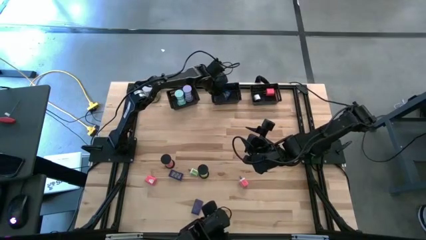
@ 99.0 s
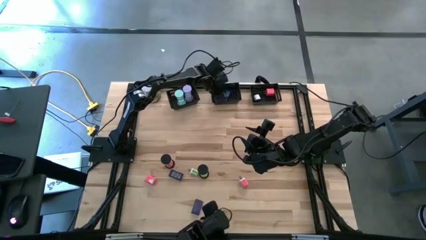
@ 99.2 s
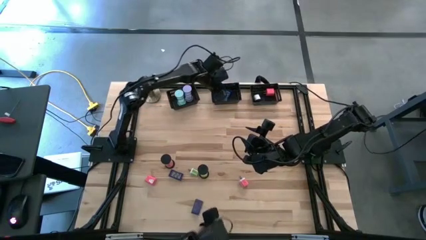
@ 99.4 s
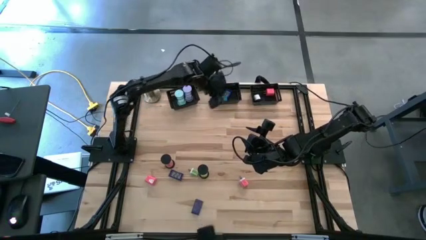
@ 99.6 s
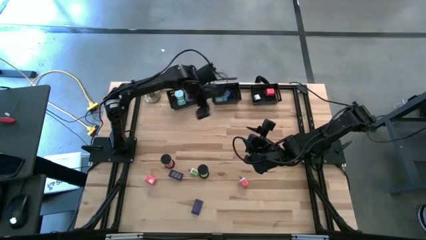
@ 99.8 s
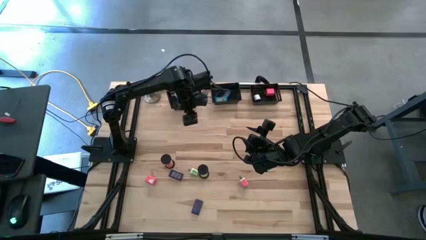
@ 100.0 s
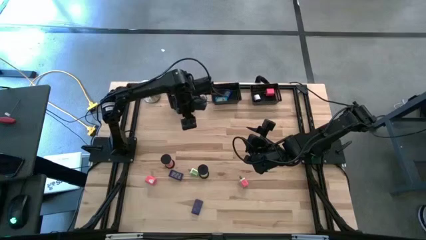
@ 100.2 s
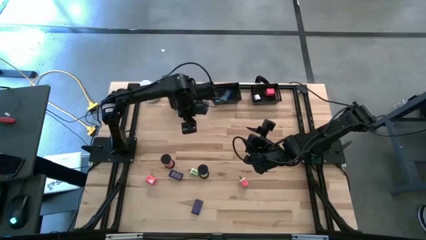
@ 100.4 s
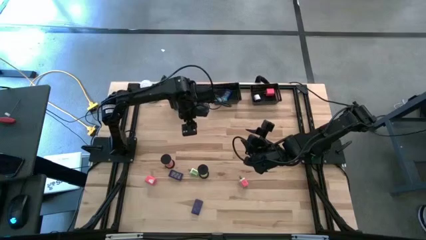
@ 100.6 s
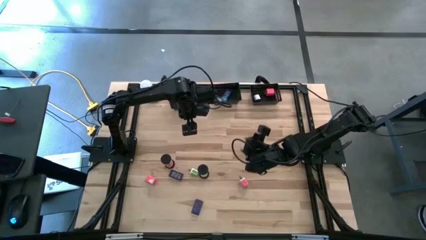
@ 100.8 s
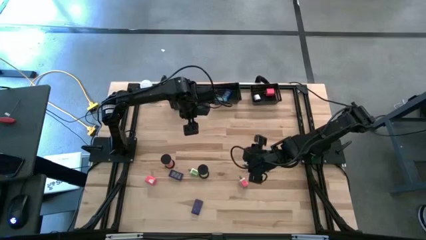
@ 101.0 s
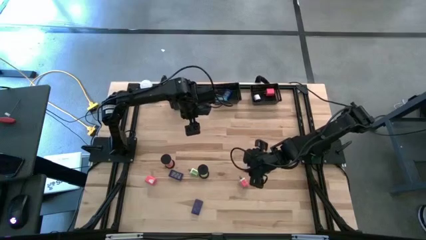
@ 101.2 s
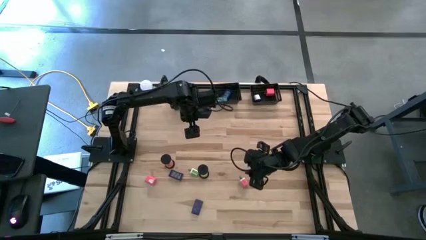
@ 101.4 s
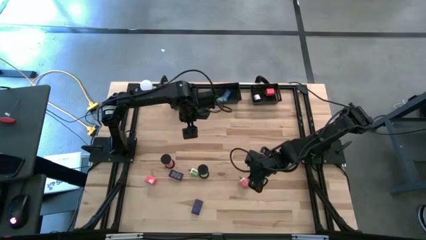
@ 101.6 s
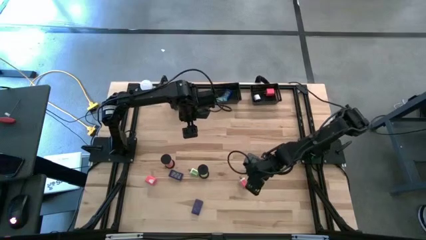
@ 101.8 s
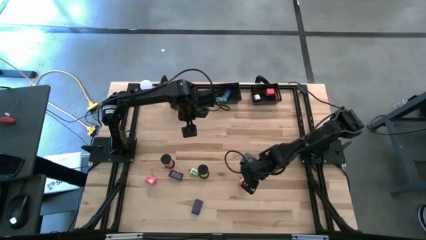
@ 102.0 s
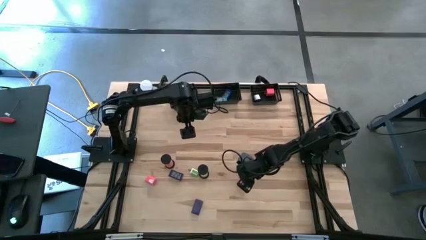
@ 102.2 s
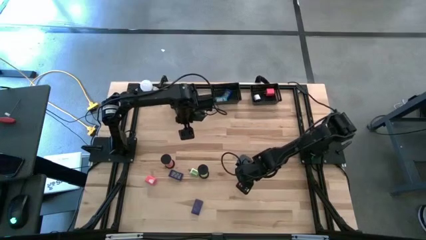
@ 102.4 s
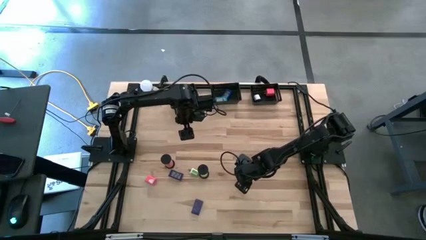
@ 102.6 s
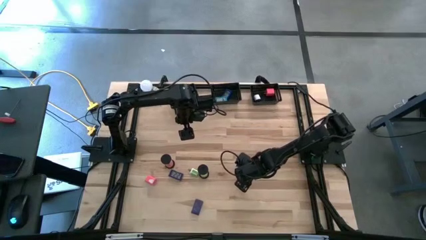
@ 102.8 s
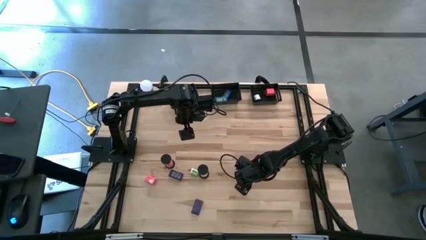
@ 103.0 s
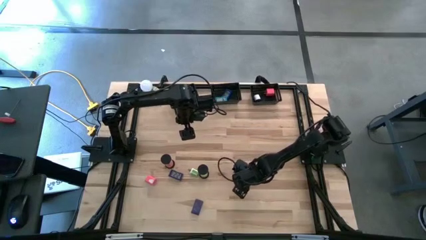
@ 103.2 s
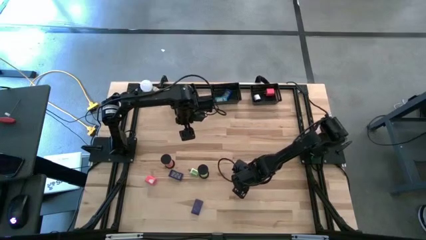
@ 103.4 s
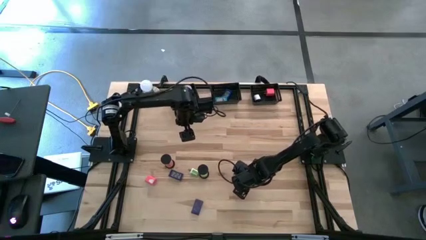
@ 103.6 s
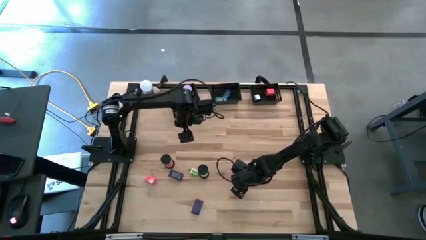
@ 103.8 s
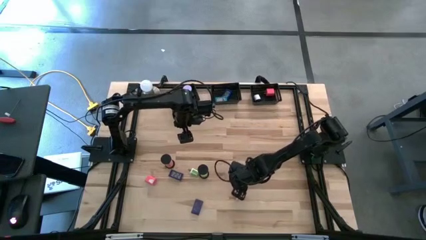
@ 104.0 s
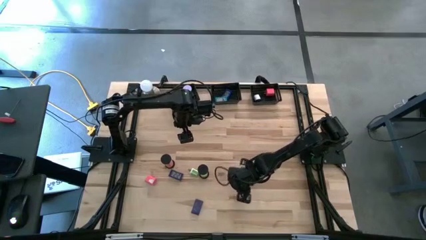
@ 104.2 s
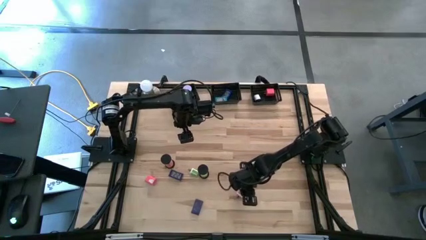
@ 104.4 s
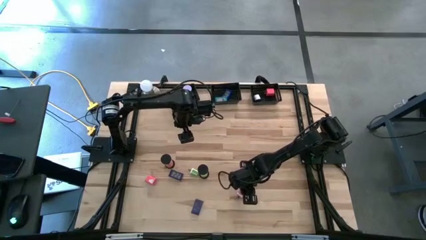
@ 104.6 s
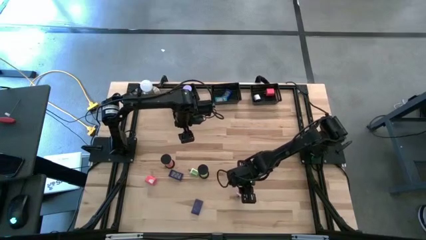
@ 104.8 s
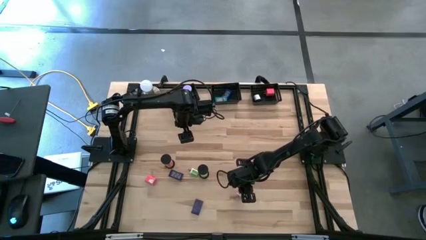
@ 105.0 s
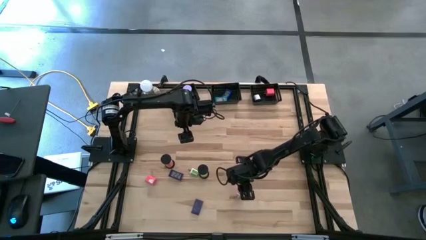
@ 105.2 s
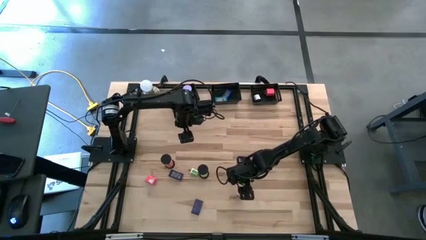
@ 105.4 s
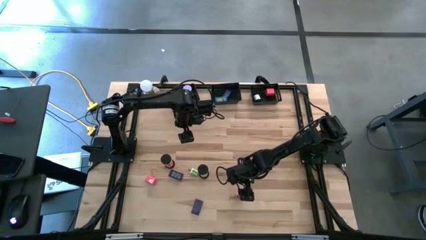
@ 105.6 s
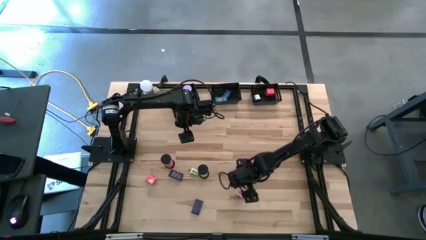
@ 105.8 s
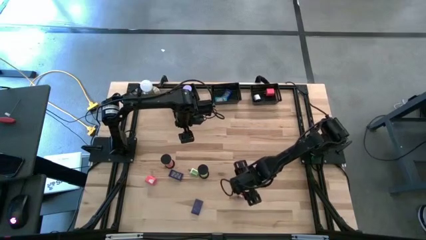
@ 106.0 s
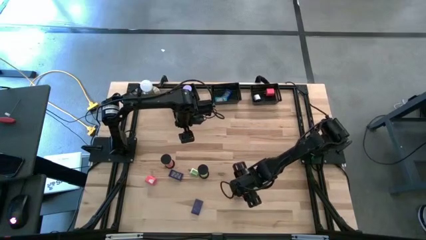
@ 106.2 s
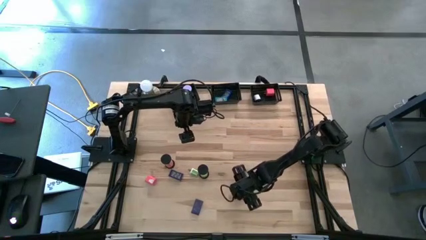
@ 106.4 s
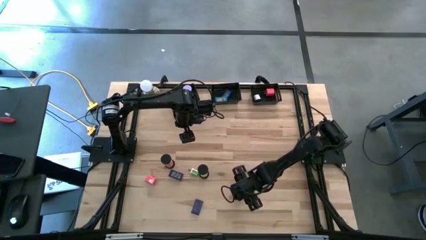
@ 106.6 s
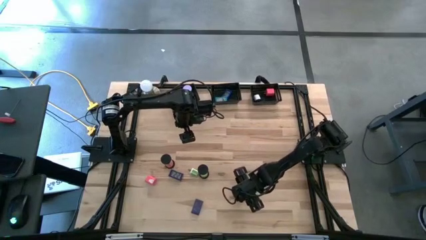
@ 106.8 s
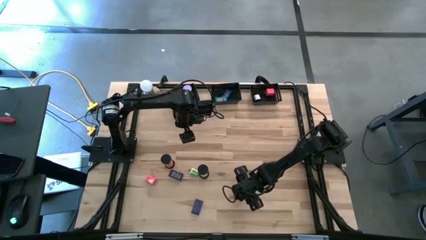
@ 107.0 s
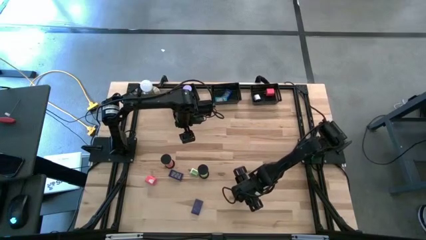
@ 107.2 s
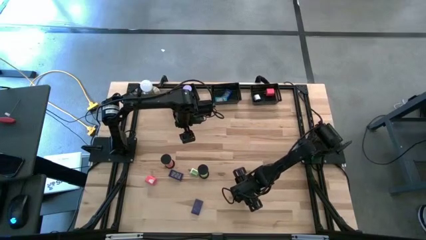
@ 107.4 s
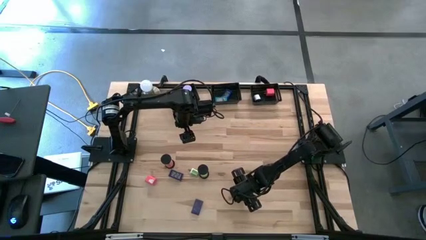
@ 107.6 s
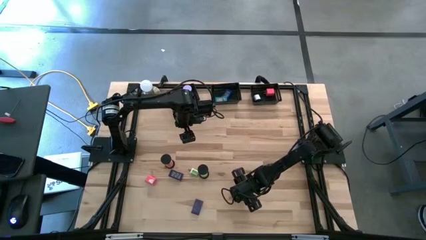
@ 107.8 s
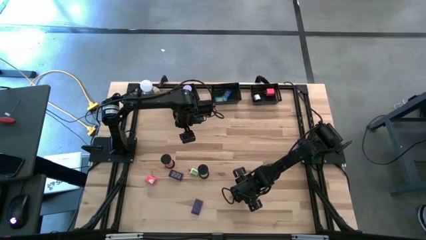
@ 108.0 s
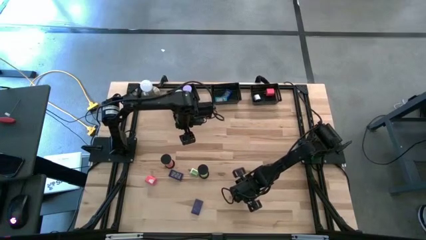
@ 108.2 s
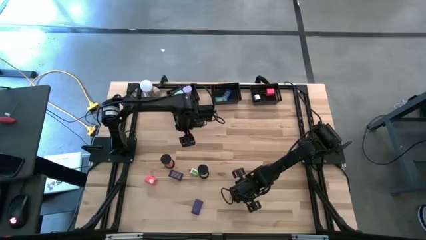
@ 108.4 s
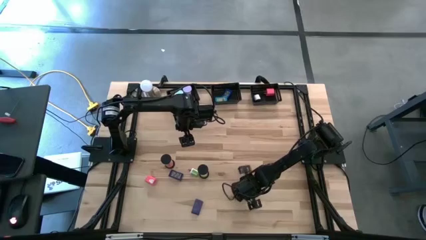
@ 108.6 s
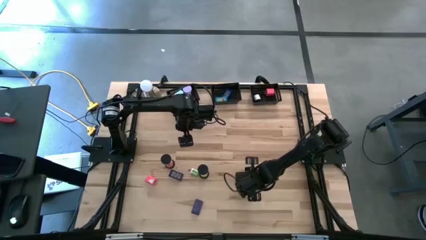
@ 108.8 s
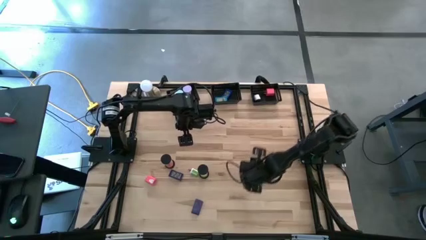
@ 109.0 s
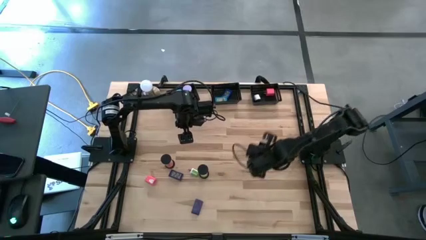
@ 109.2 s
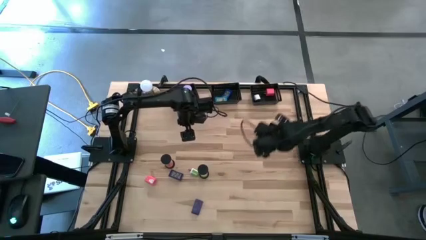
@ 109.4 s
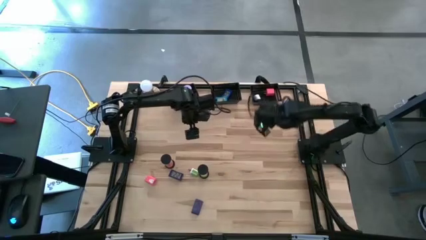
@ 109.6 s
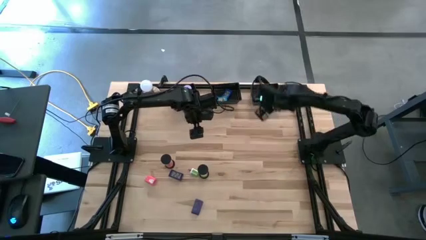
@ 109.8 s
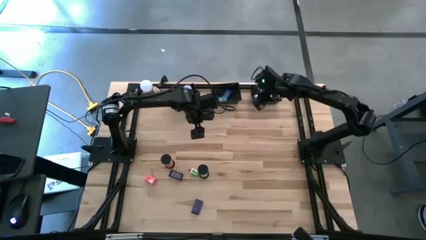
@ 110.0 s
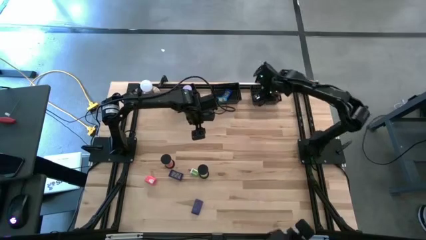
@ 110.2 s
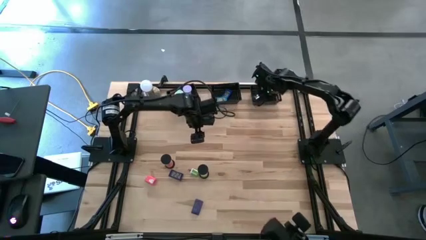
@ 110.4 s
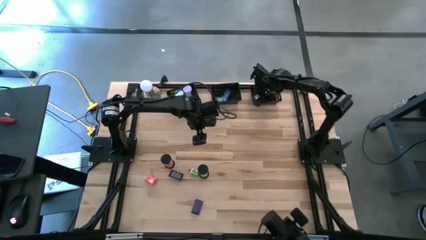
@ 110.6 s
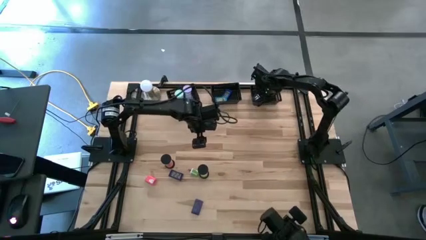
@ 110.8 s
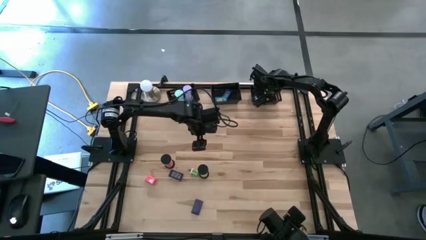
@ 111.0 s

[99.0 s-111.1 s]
Task: Pick & Place Office items
Put the pink white charger adapter into the right black bin
